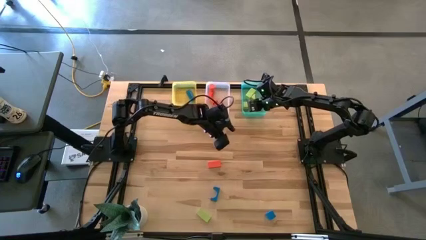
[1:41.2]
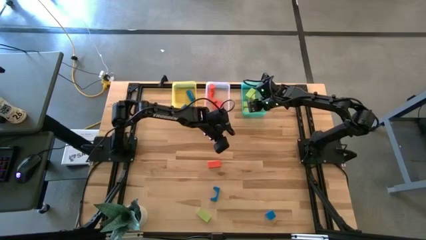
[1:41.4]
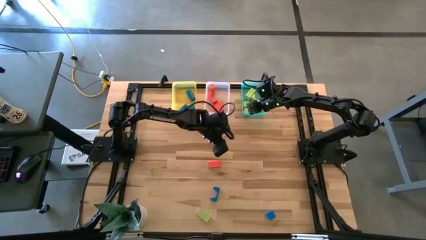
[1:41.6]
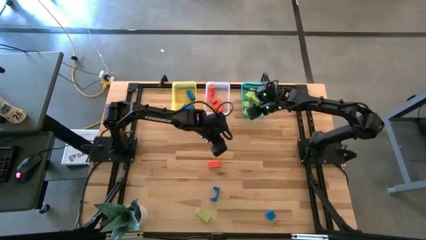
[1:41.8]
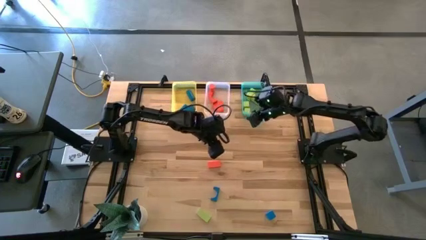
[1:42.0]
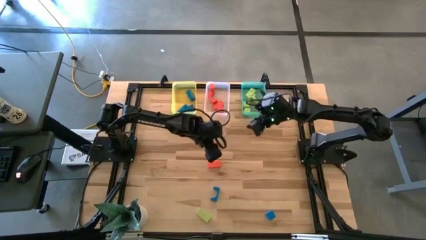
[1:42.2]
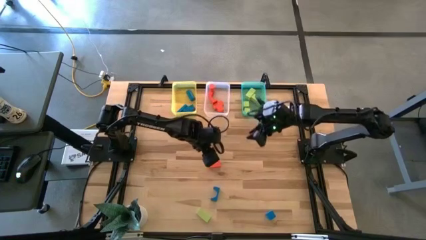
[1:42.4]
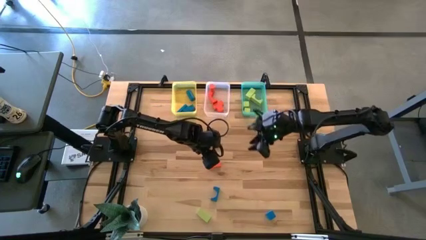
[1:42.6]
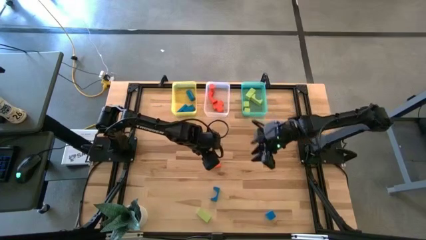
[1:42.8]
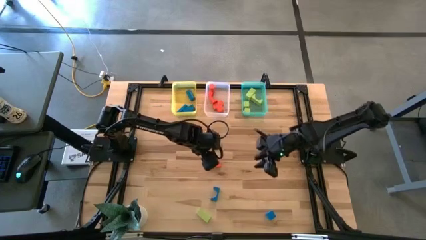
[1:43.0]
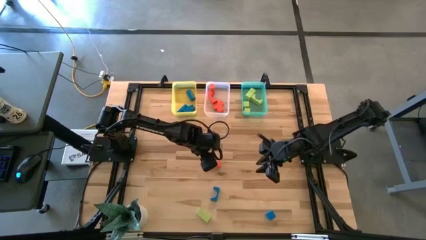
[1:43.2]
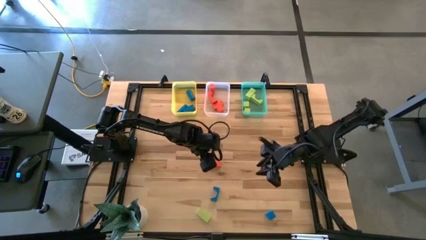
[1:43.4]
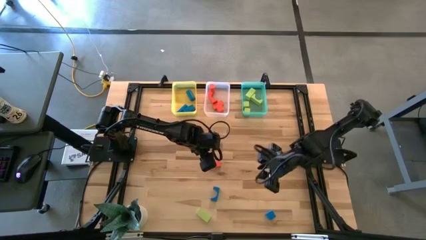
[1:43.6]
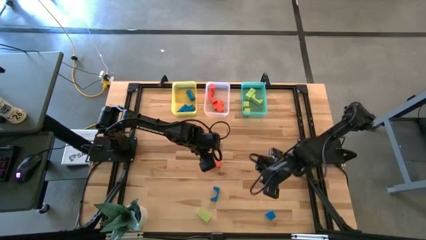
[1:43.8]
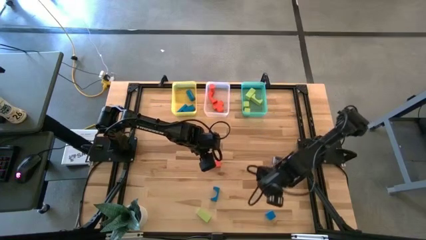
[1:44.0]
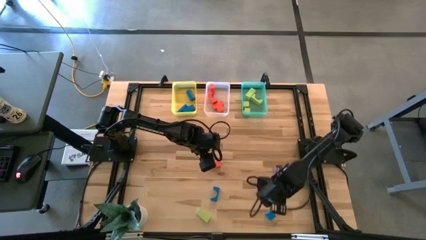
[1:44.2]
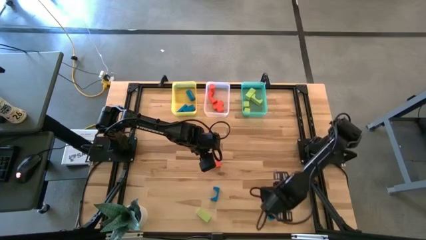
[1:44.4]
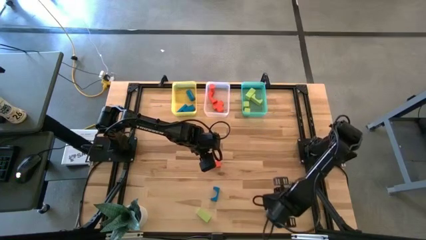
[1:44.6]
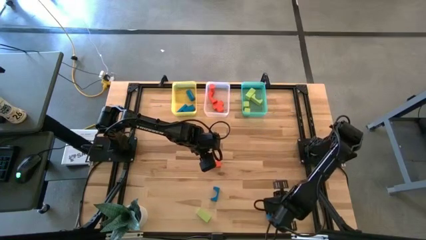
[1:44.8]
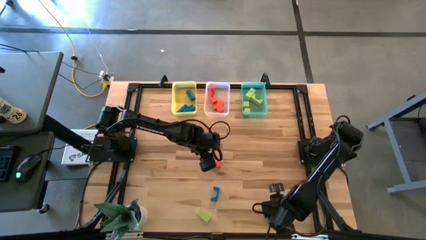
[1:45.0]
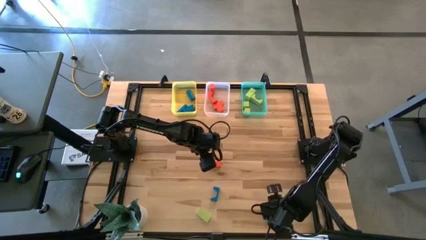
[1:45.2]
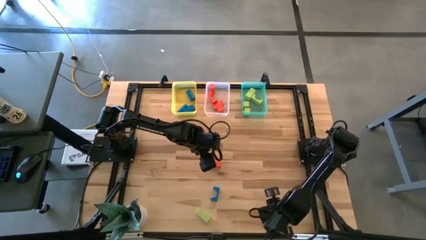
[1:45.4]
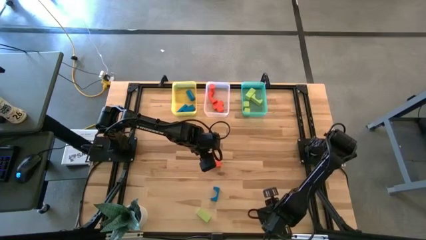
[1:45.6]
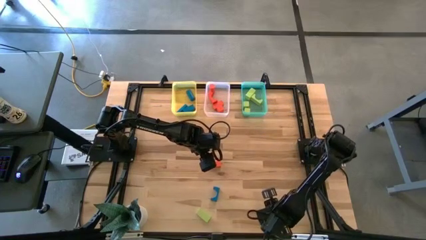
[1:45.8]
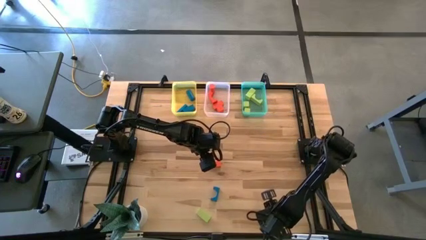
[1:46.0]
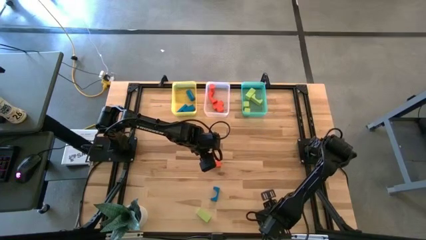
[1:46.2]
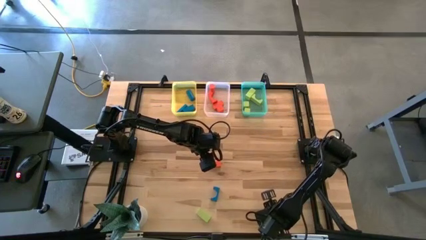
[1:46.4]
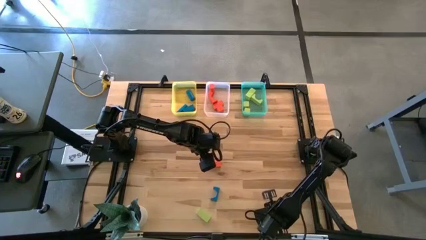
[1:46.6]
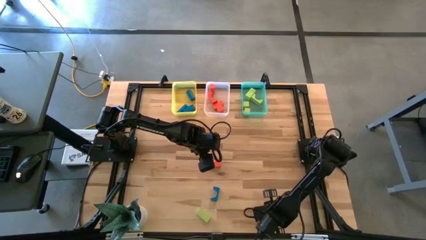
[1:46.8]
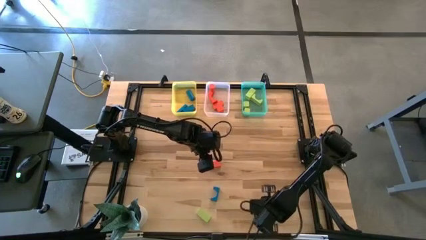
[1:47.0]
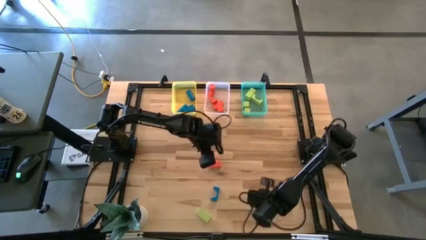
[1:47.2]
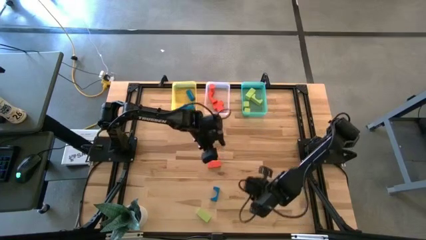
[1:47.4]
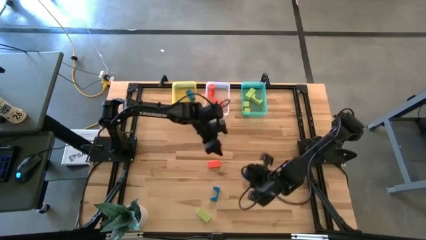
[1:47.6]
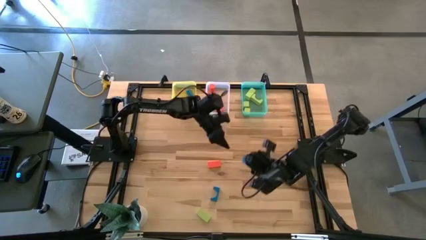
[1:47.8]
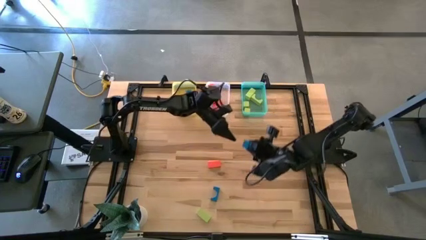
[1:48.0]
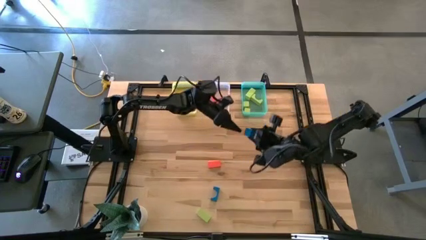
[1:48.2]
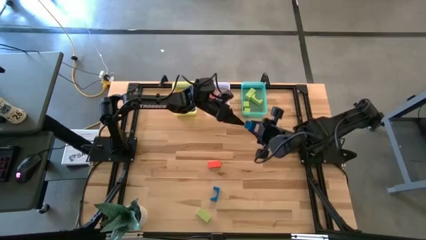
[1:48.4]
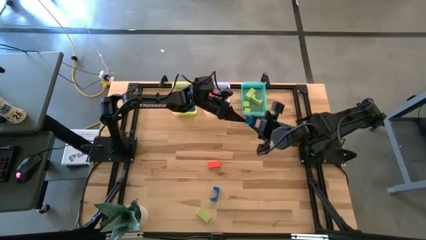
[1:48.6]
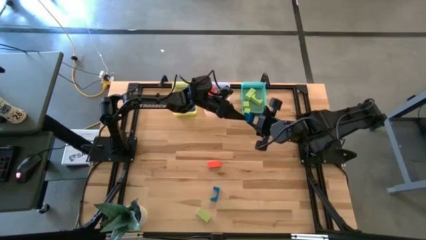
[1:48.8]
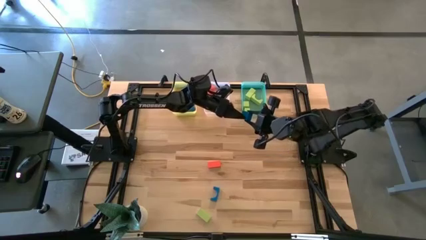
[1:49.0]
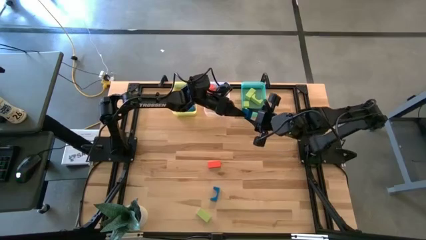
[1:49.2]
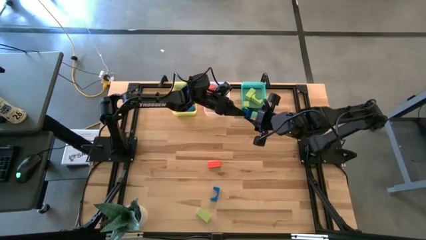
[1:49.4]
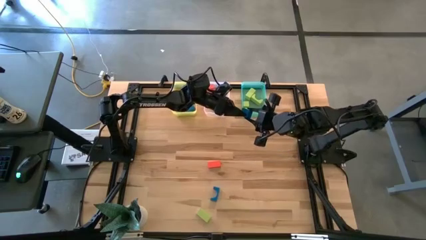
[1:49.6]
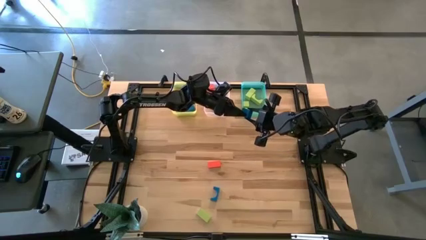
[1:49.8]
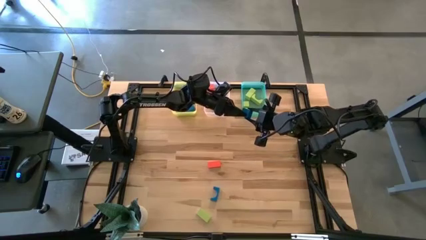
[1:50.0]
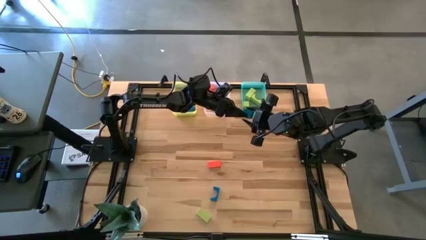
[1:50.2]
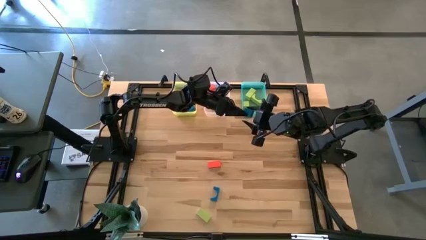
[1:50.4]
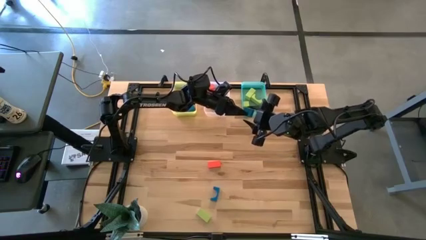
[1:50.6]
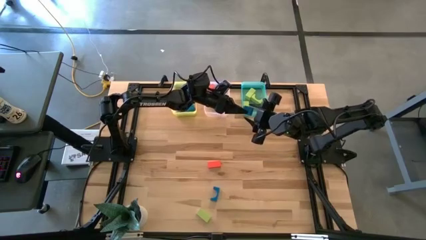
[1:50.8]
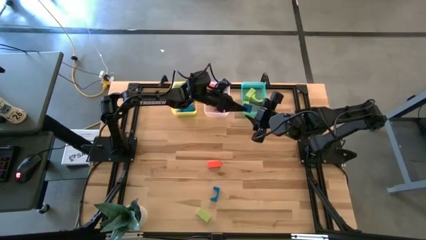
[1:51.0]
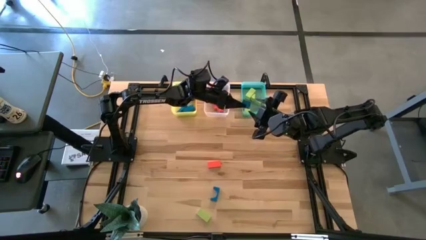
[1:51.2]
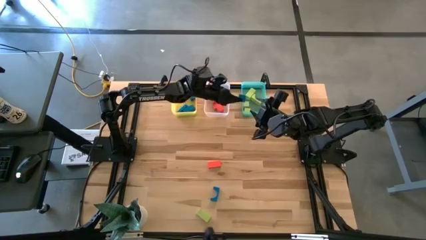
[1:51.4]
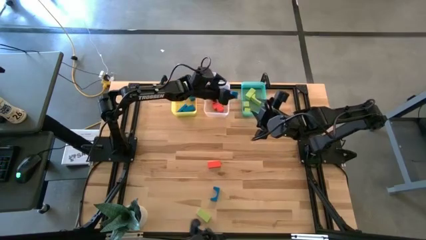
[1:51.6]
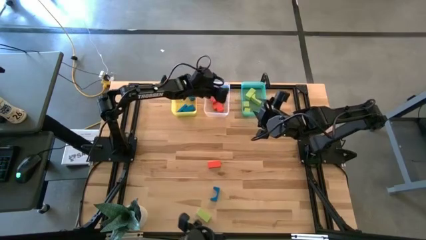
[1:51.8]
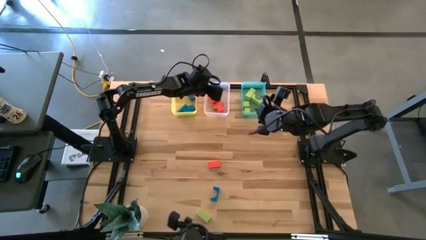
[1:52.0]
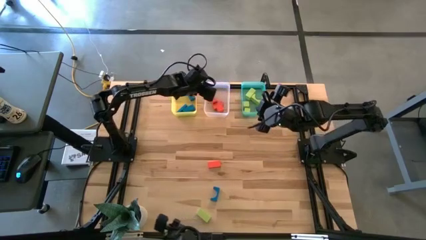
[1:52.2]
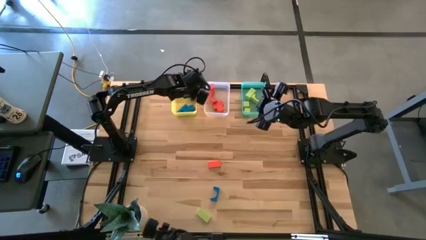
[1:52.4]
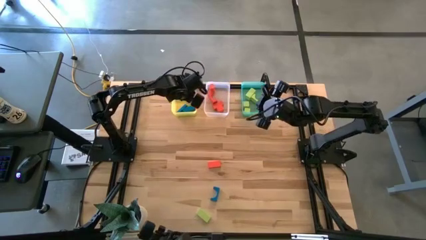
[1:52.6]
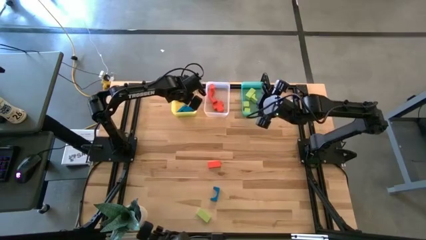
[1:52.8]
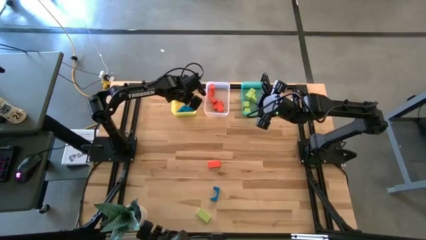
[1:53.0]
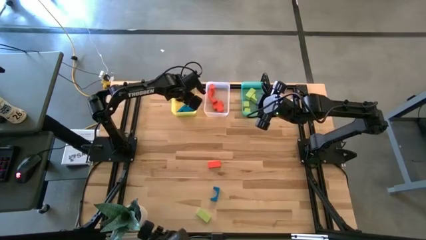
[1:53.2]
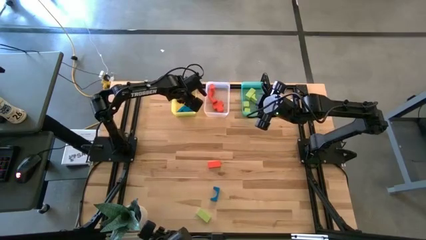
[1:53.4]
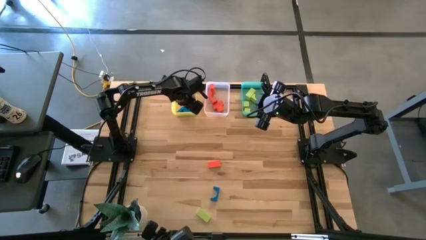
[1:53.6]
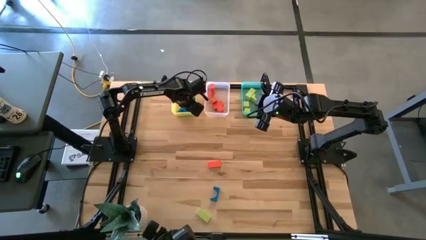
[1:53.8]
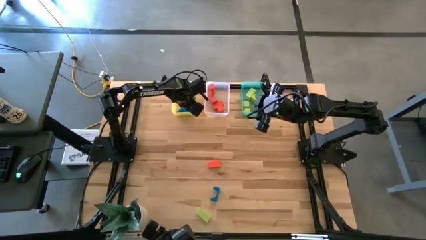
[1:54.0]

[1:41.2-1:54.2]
Task: Sort & place blocks by color
Put the blue block into the yellow bin

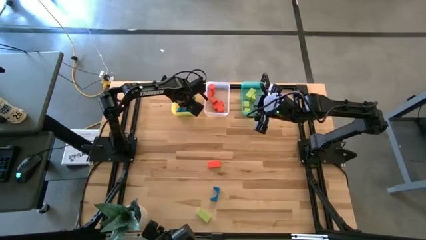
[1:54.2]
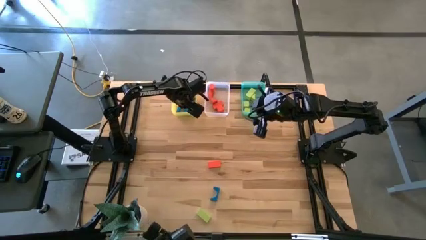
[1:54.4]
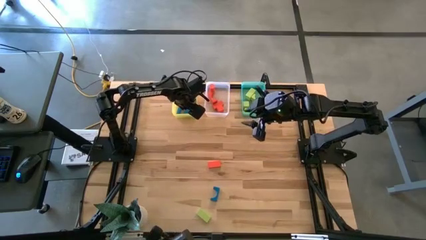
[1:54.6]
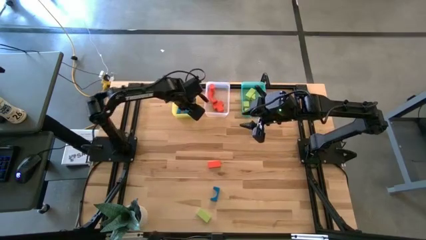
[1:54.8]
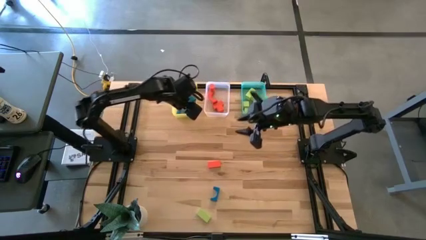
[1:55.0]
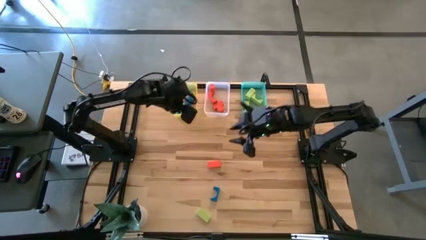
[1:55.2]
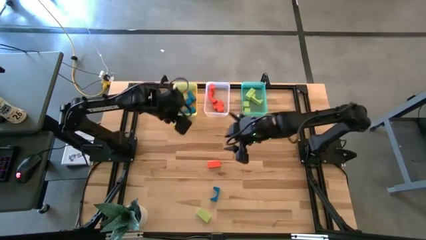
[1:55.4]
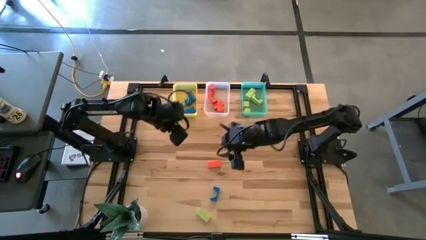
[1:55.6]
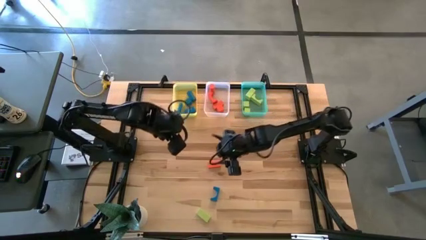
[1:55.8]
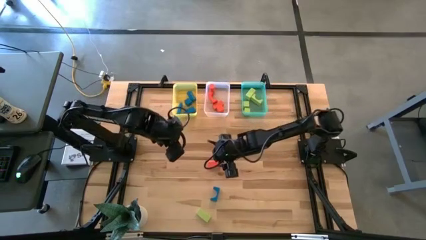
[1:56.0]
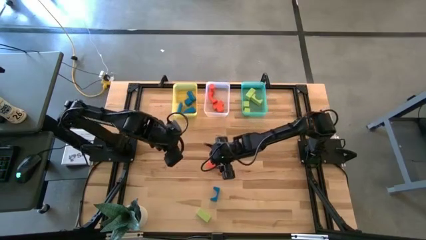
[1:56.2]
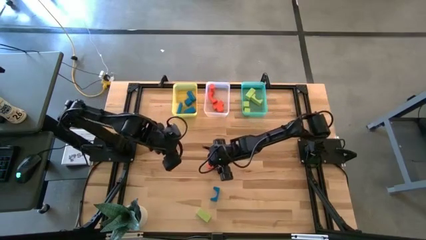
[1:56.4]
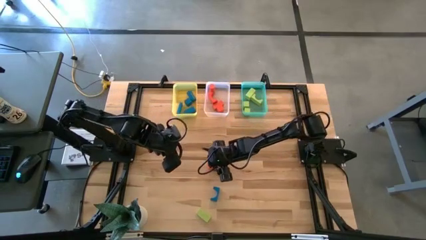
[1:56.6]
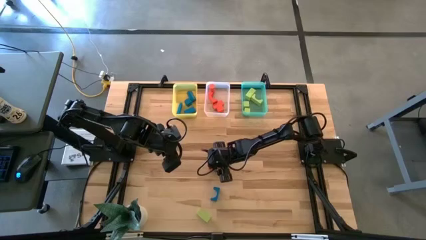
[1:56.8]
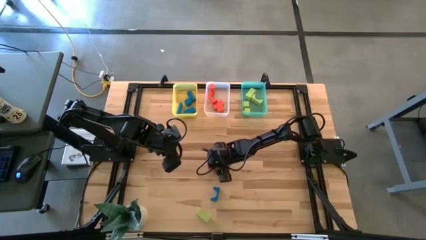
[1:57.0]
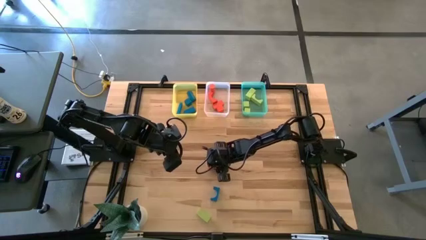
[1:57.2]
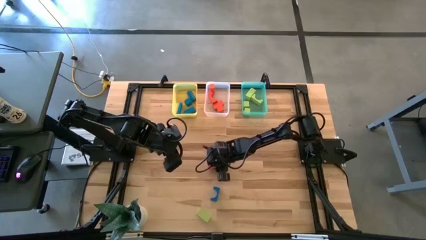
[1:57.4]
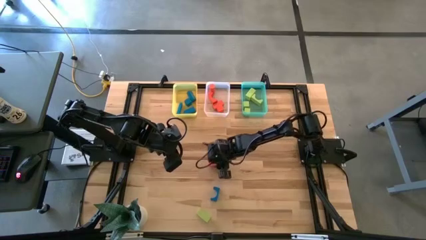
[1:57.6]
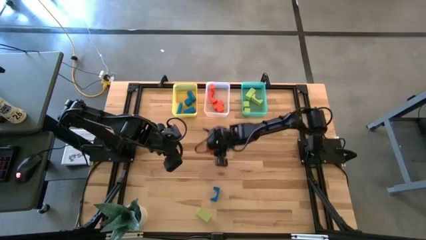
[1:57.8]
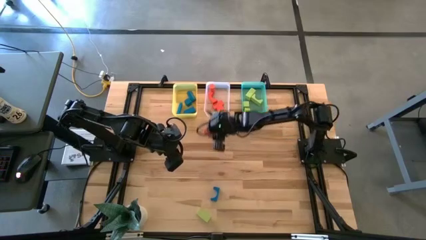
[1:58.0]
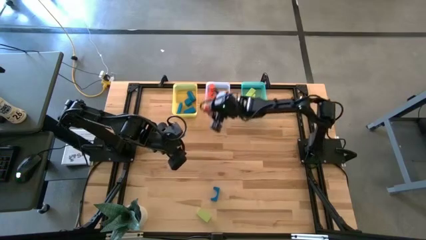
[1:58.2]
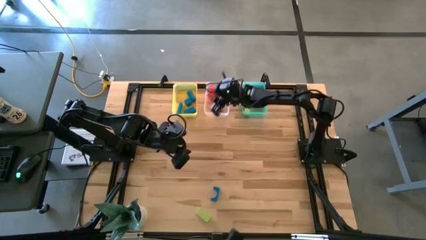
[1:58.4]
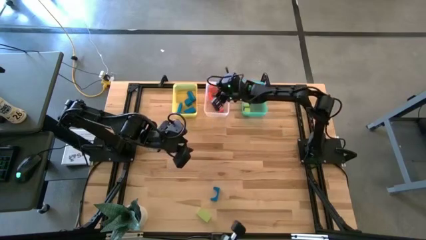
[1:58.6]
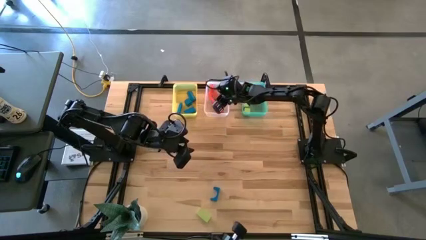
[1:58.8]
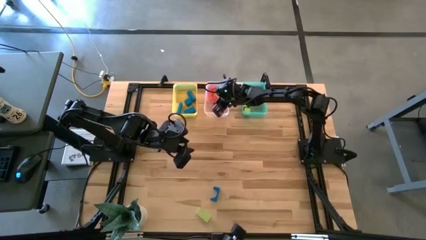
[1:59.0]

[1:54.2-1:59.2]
Put the orange block into the transparent bin
